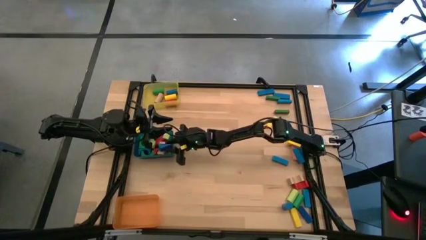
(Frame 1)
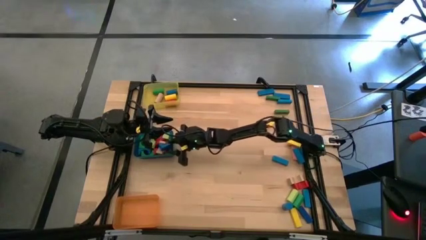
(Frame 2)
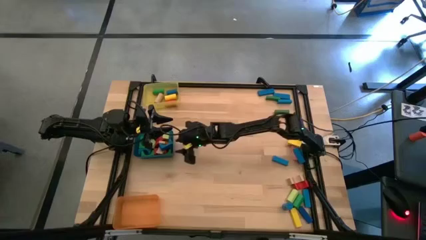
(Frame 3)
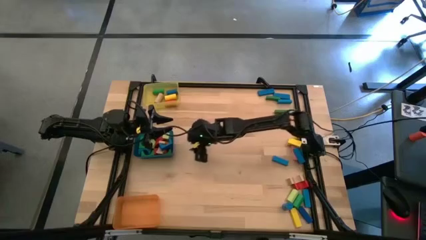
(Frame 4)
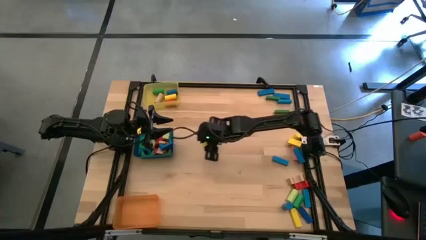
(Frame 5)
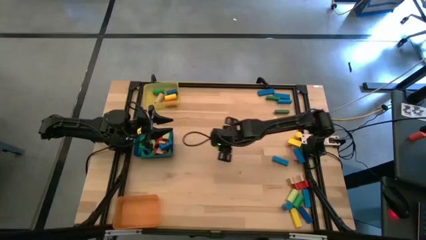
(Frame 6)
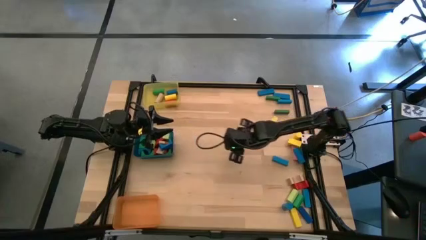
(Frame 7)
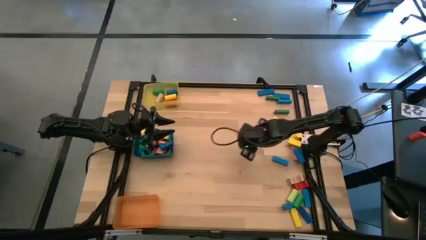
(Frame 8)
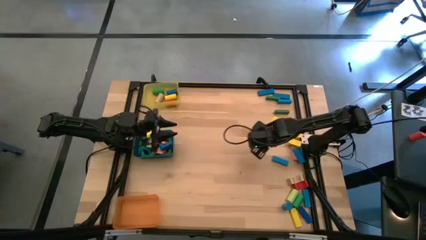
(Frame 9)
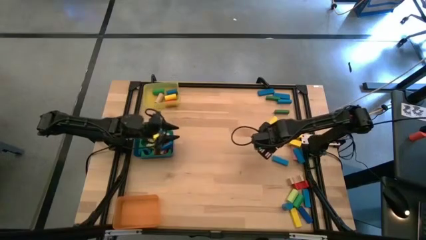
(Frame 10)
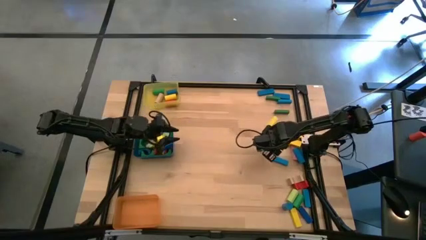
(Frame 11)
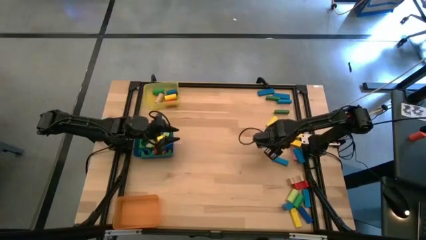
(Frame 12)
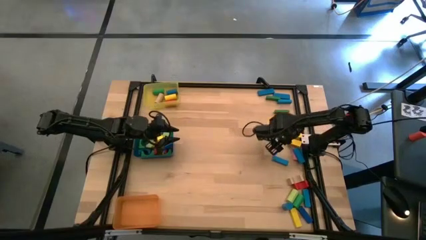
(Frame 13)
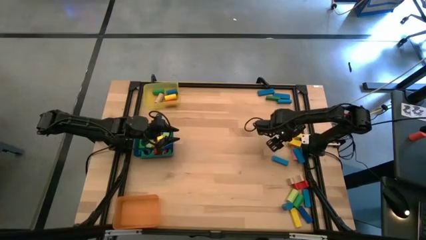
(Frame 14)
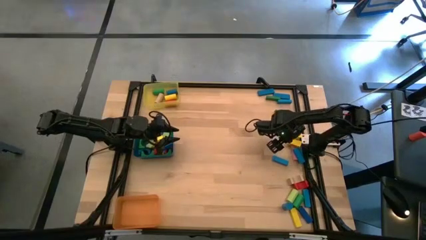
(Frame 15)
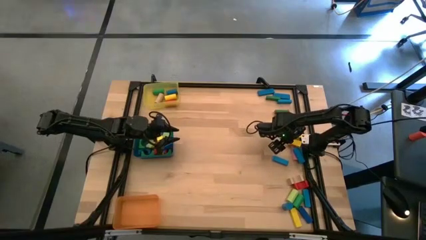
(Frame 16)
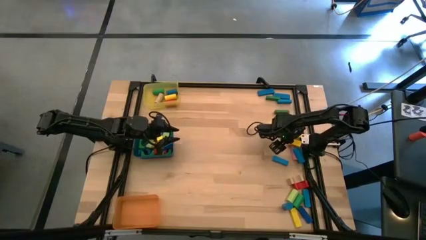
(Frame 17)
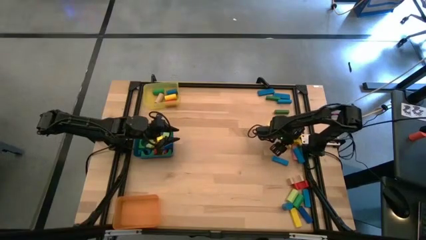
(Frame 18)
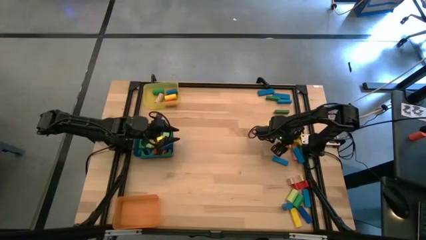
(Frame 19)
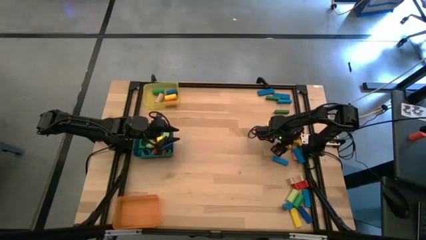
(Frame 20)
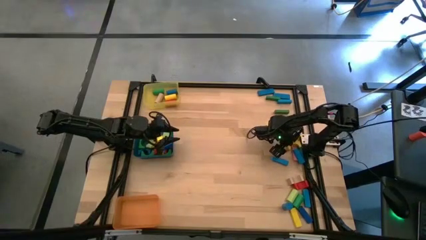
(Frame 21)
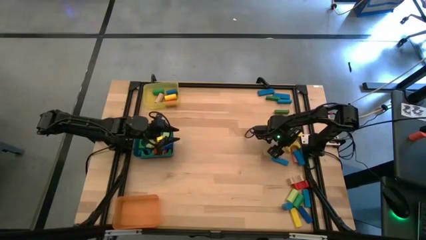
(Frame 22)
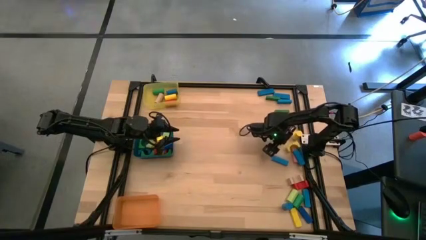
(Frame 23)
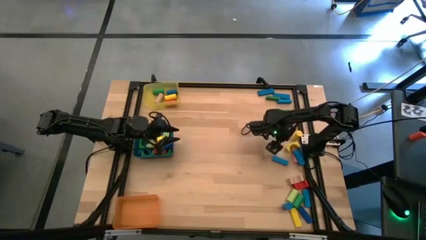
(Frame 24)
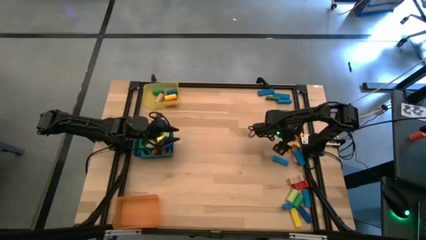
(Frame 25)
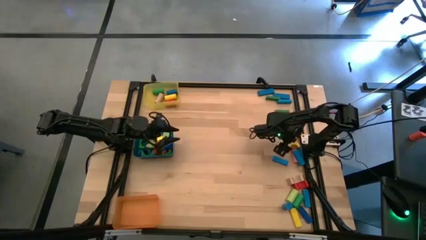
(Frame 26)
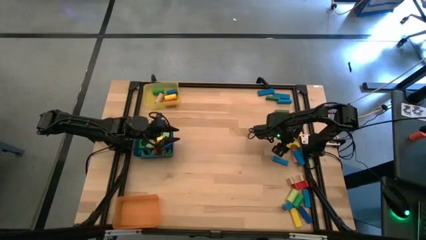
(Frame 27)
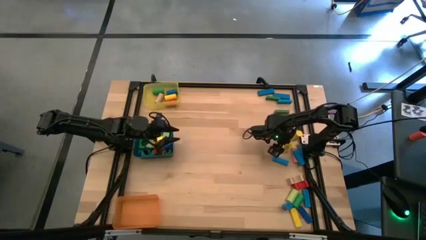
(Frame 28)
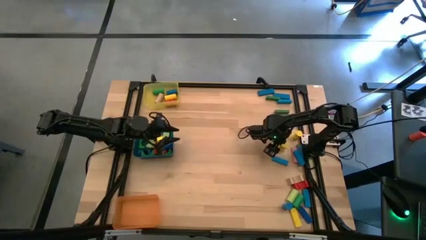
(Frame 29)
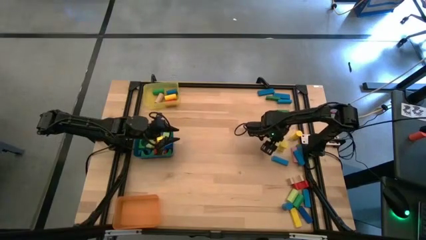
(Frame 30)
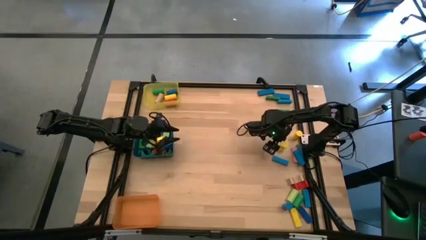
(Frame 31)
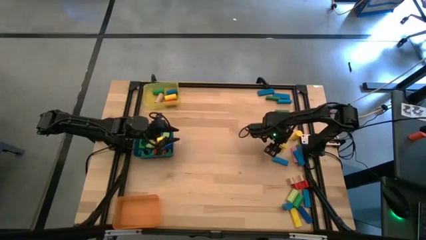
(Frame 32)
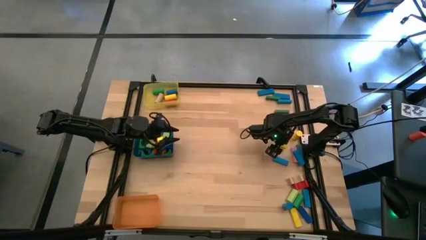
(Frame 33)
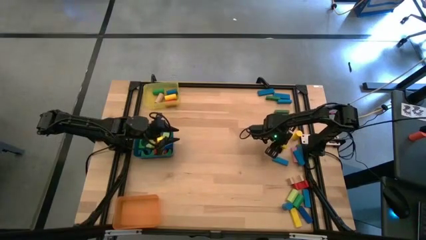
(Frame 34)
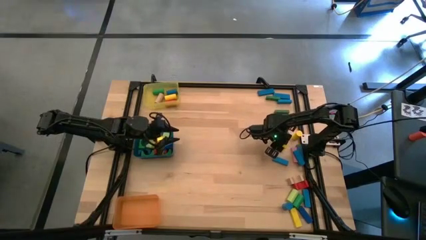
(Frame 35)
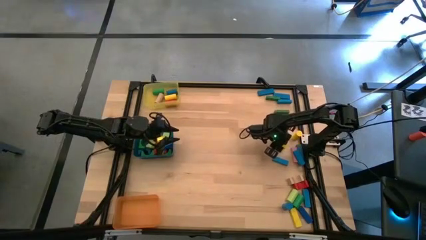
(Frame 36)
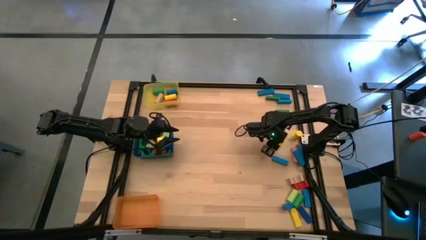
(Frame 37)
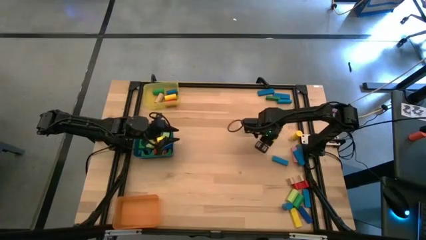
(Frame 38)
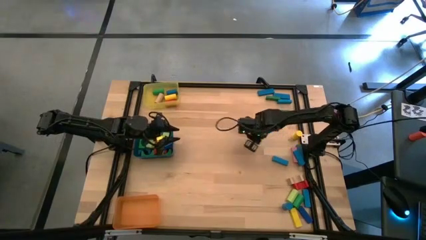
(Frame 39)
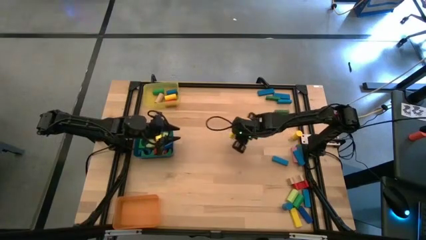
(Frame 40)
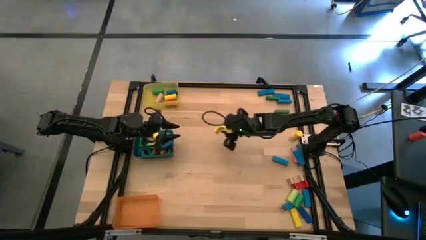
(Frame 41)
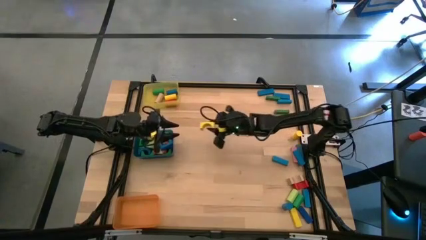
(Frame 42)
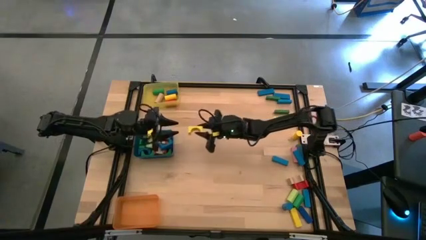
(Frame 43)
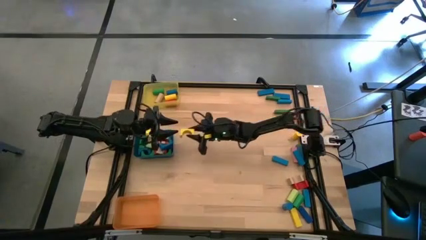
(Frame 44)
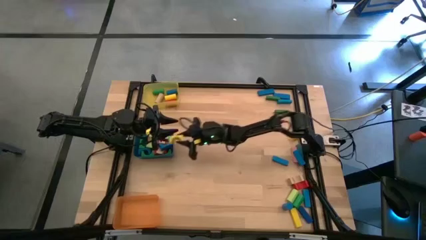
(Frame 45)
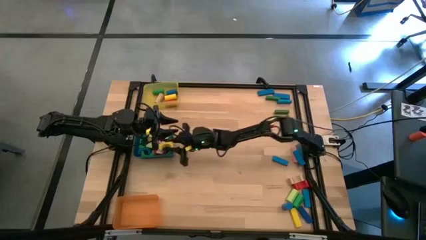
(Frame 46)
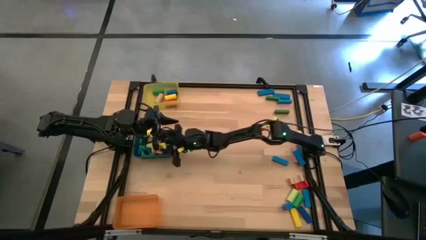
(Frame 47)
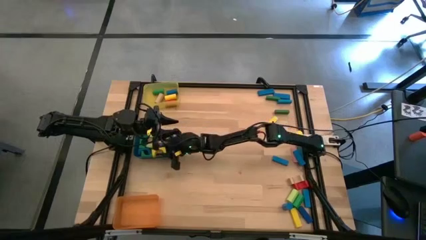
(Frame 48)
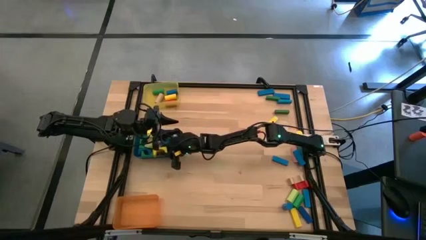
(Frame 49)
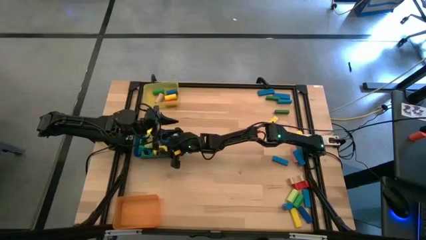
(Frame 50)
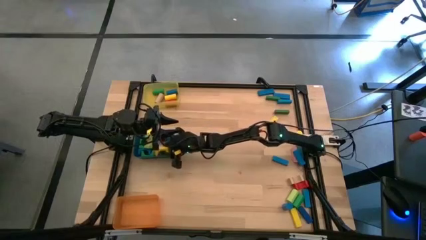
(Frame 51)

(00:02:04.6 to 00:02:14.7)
Task: Sort blocks by size
Put the yellow arch block into the blue bin

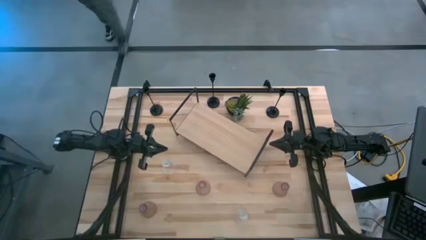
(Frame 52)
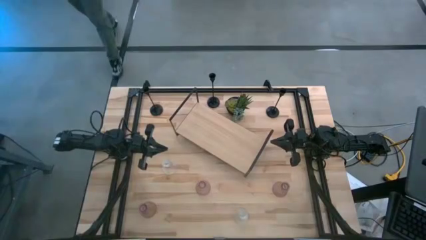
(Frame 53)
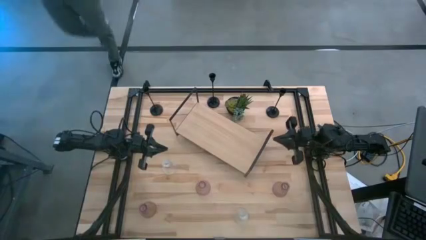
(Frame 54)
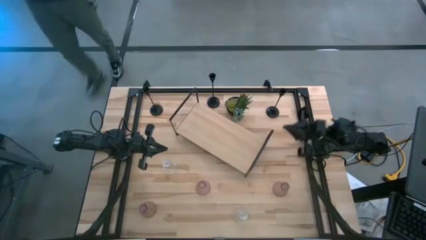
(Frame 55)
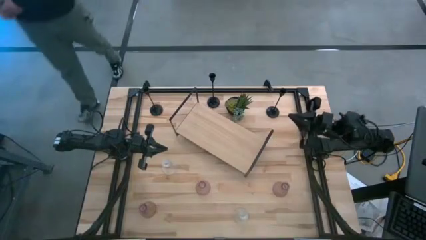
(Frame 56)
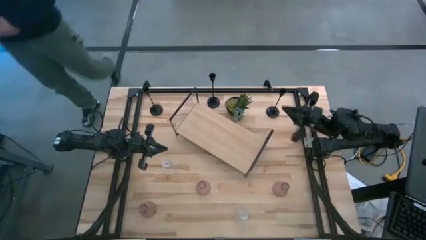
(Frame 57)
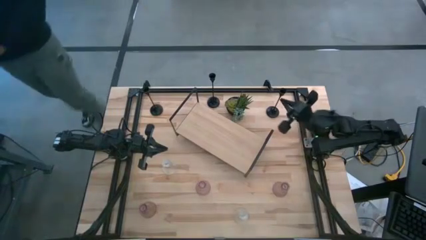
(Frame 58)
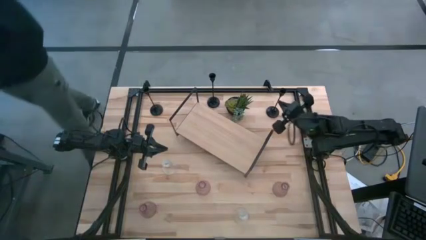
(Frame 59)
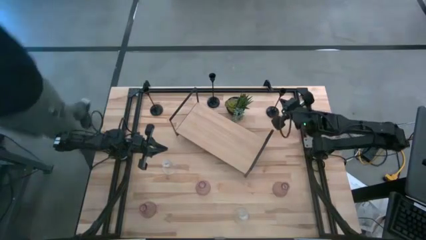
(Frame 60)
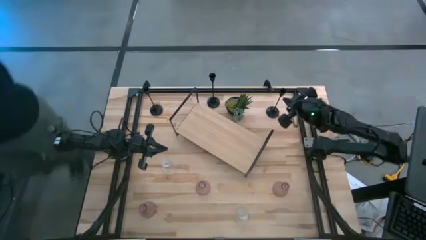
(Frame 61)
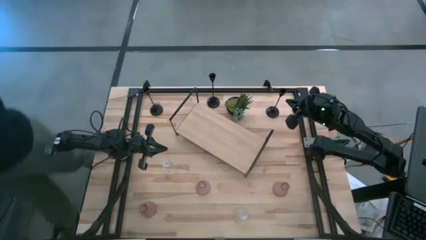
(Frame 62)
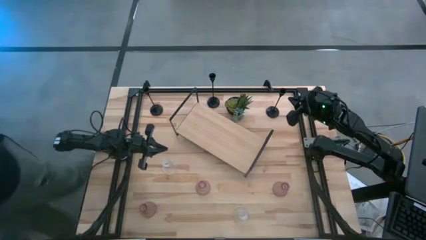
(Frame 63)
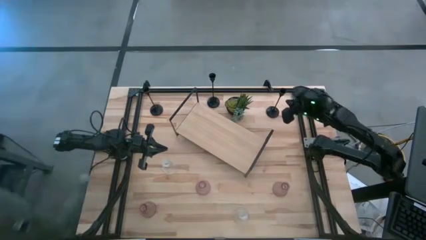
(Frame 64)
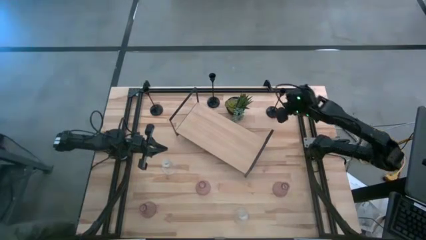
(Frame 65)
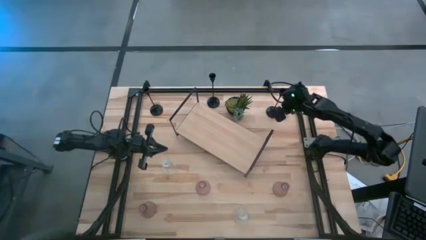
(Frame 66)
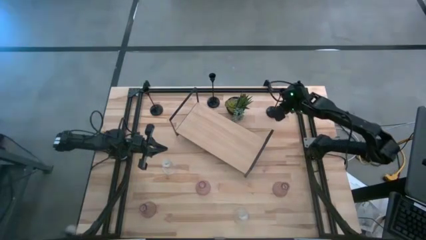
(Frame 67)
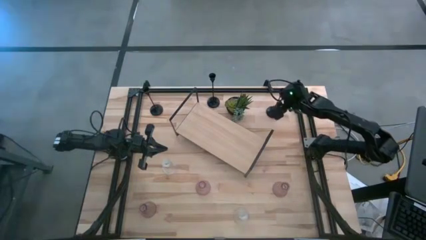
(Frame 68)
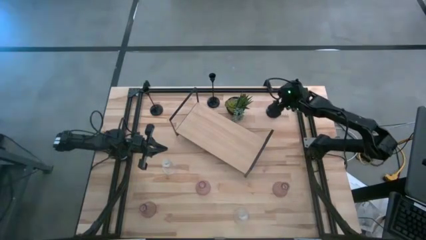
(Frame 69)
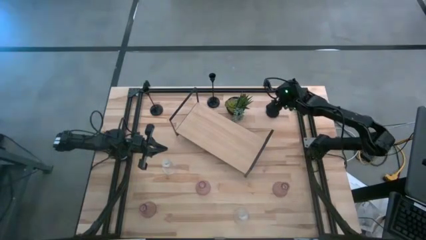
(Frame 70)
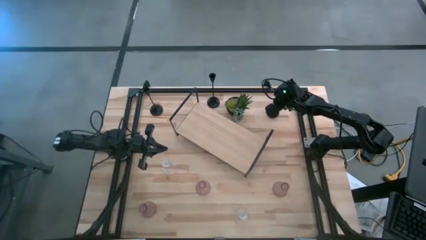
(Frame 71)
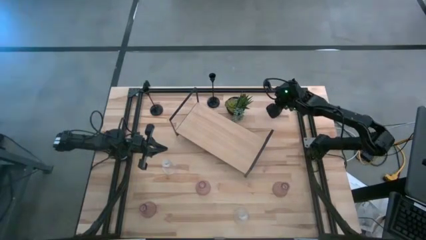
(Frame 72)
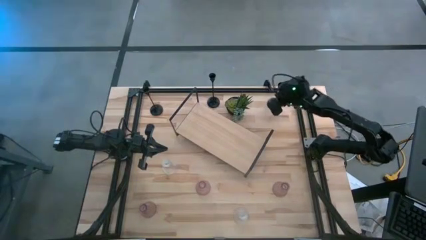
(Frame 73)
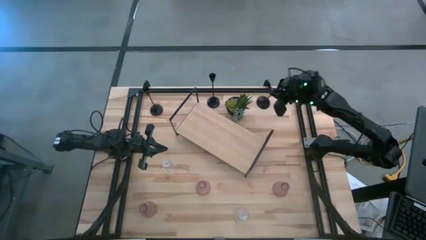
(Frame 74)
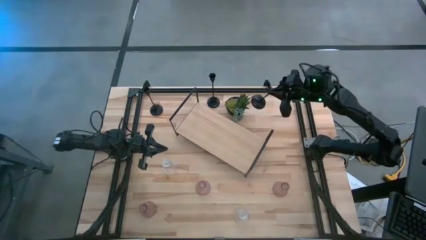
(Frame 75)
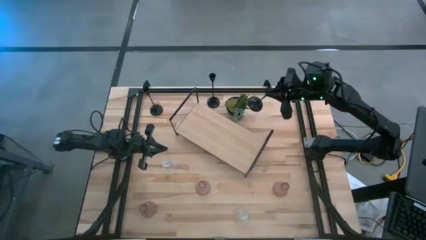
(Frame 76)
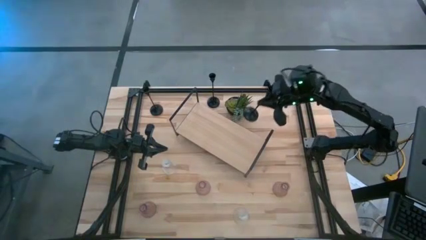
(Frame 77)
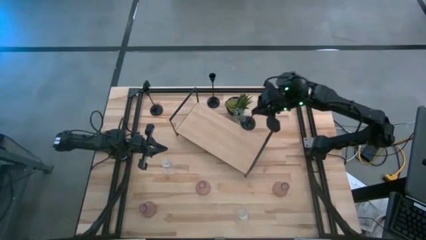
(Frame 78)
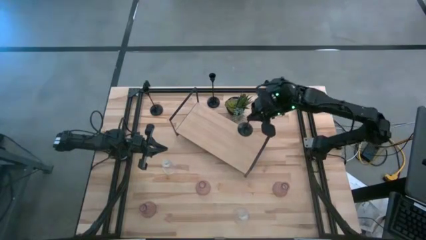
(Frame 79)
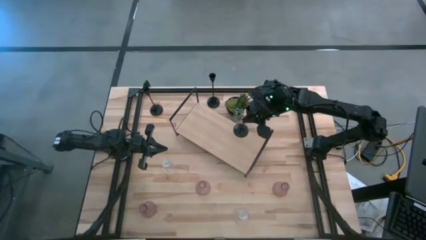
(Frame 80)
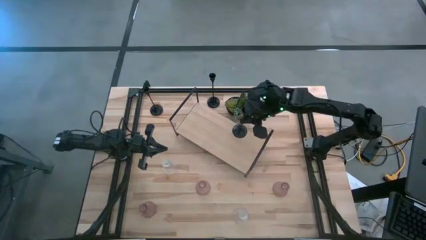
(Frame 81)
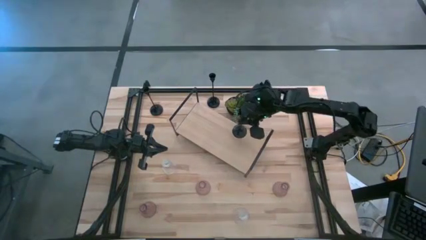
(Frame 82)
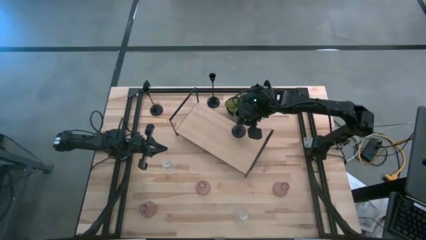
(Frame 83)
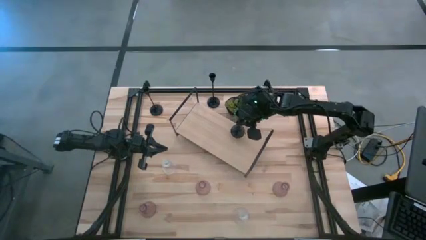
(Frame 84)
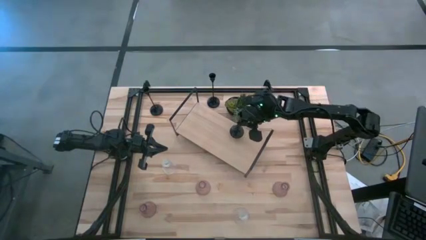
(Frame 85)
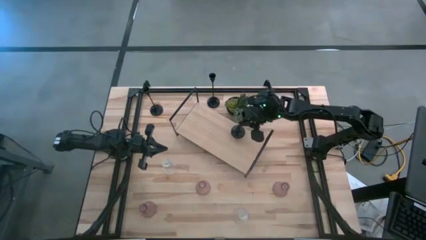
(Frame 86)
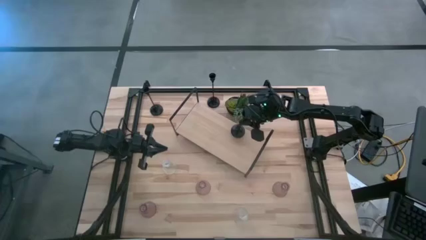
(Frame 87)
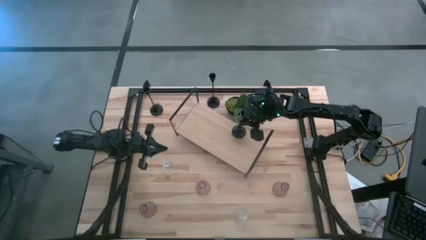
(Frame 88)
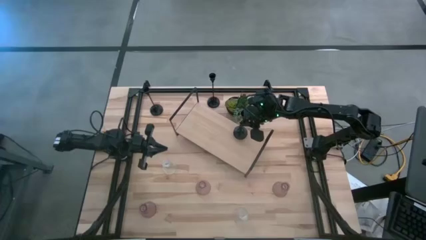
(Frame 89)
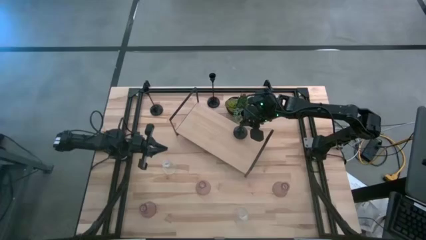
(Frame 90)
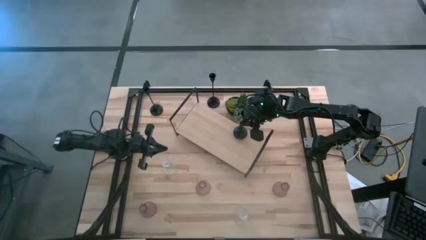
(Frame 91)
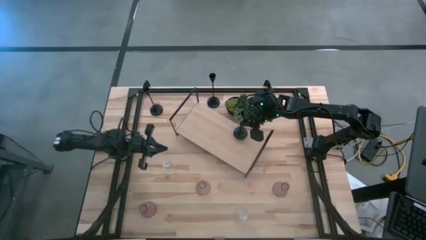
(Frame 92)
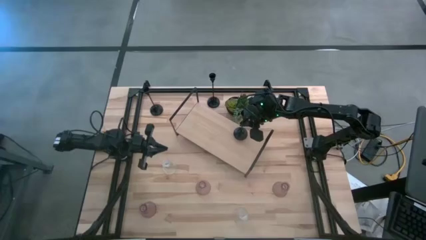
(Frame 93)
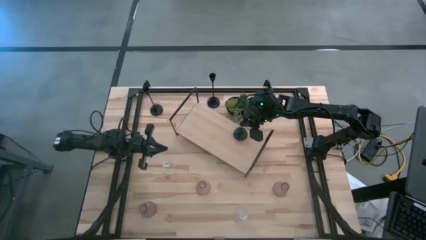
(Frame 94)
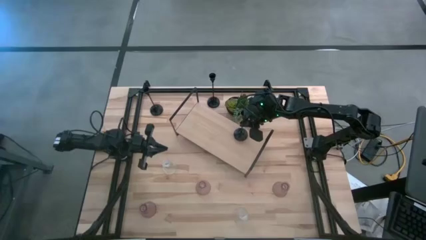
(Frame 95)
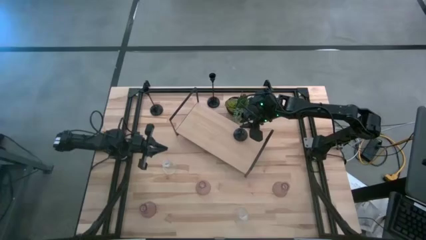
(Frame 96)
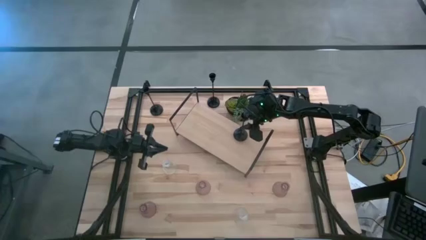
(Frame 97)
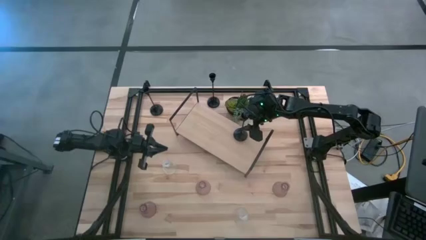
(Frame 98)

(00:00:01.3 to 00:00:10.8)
Task: Pick & Place candle stick holders
Put the right black candle holder on the shelf
